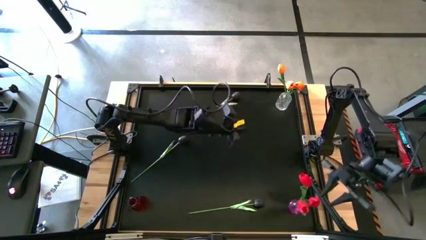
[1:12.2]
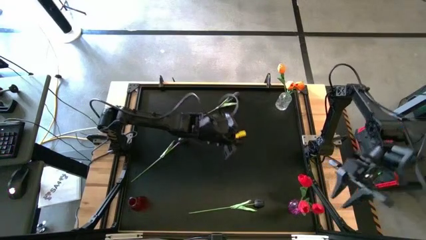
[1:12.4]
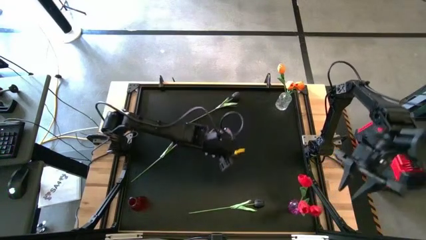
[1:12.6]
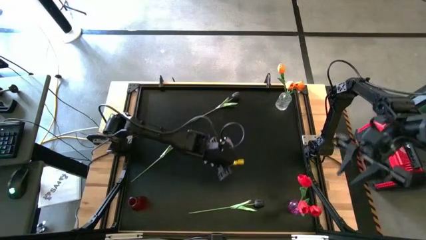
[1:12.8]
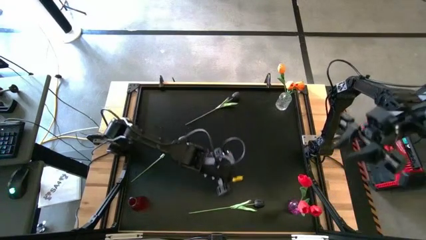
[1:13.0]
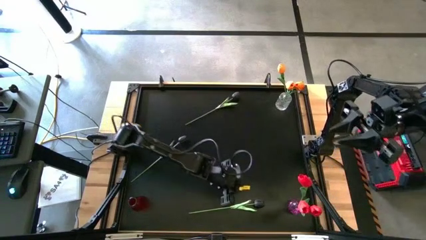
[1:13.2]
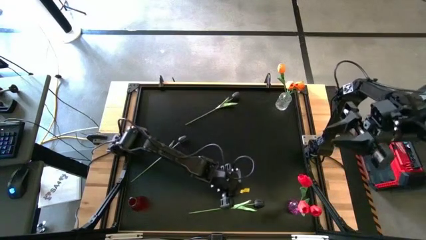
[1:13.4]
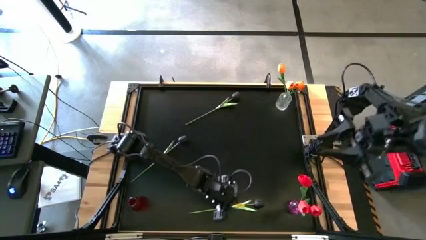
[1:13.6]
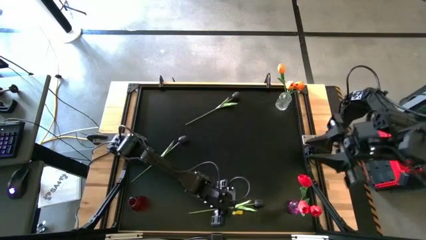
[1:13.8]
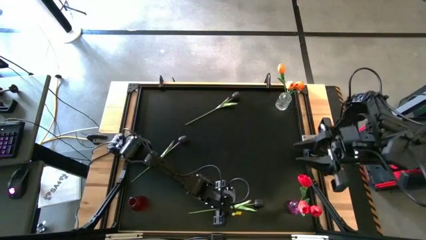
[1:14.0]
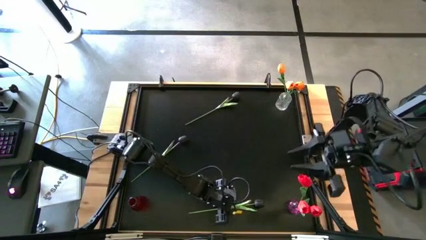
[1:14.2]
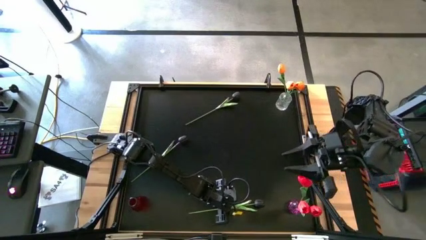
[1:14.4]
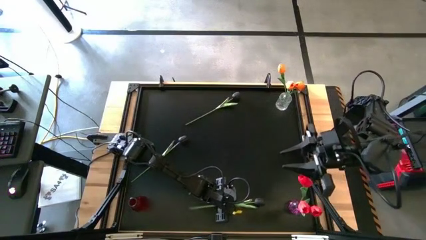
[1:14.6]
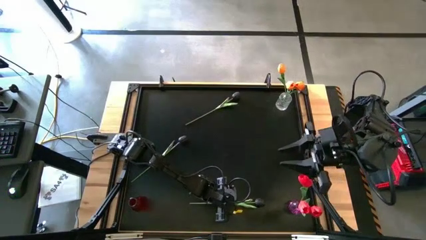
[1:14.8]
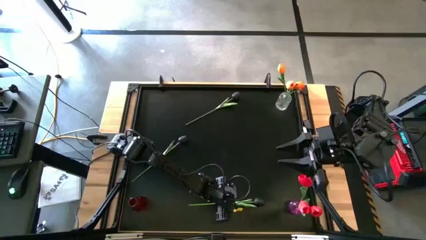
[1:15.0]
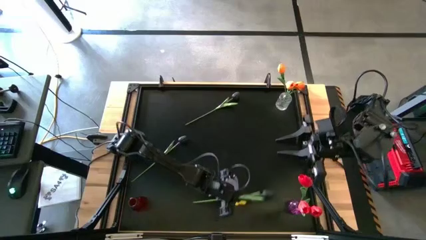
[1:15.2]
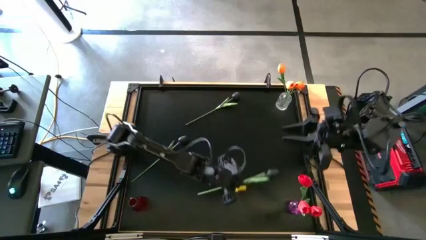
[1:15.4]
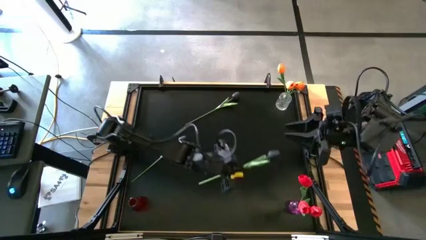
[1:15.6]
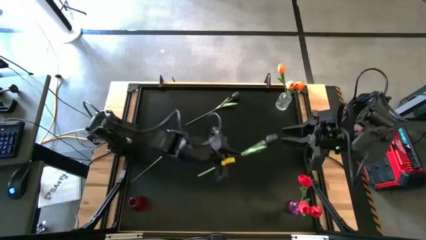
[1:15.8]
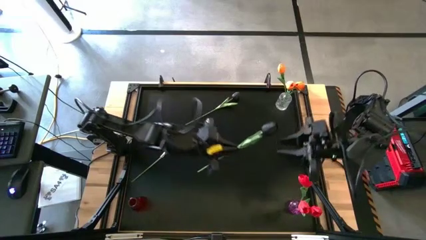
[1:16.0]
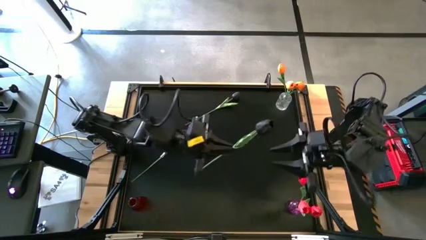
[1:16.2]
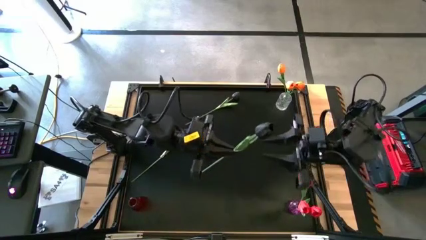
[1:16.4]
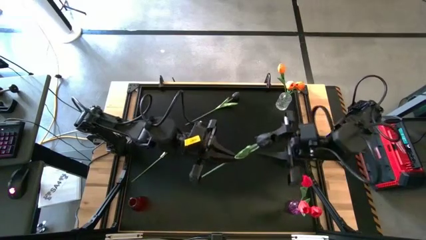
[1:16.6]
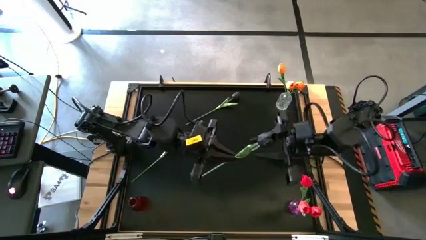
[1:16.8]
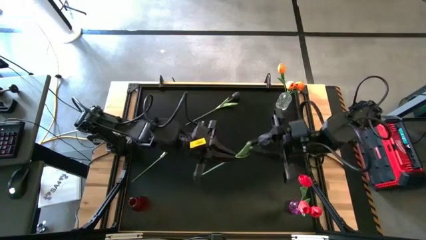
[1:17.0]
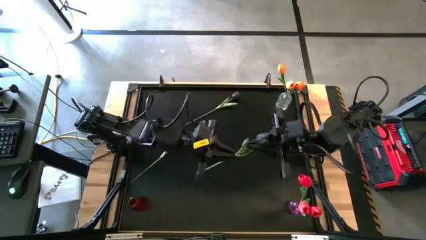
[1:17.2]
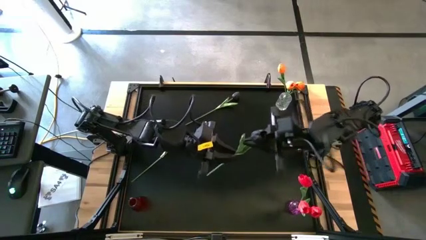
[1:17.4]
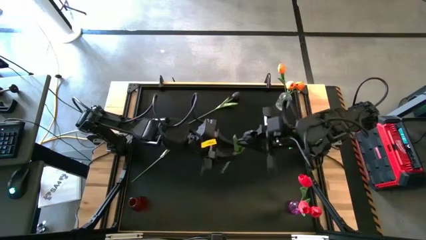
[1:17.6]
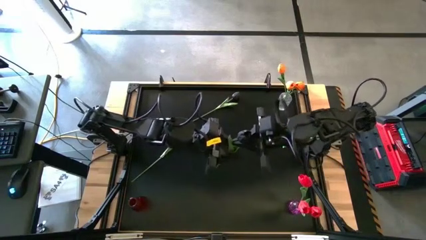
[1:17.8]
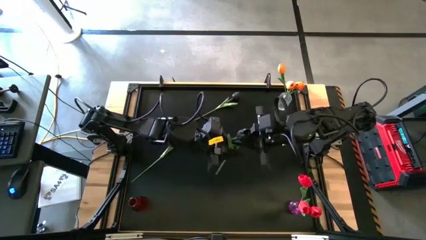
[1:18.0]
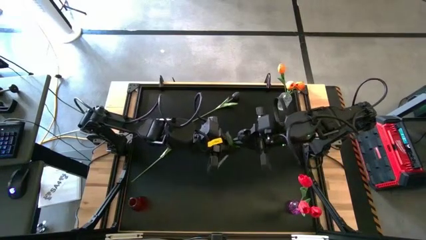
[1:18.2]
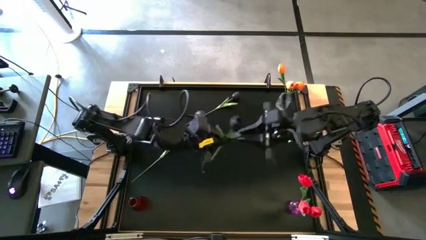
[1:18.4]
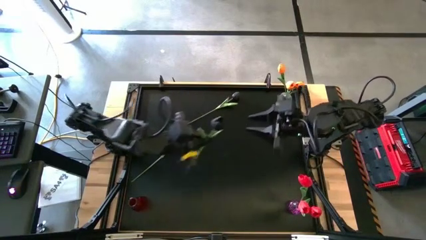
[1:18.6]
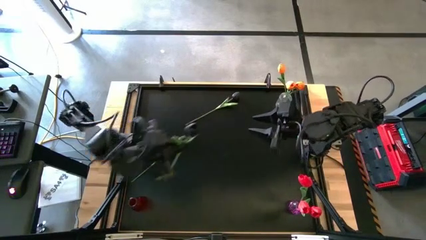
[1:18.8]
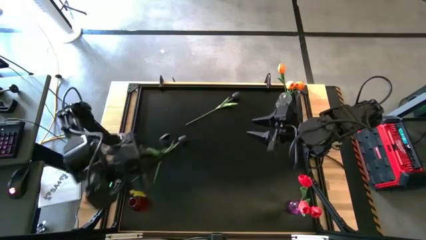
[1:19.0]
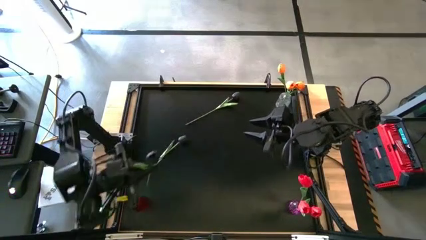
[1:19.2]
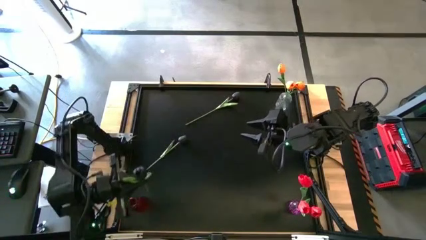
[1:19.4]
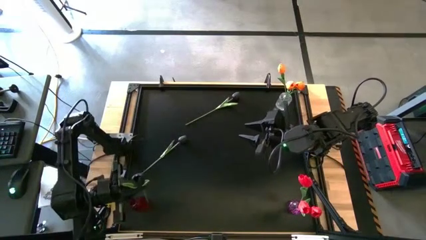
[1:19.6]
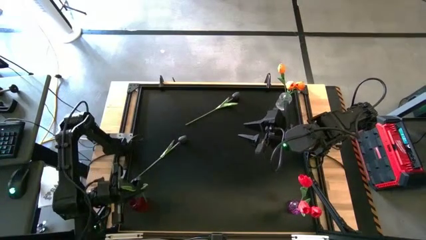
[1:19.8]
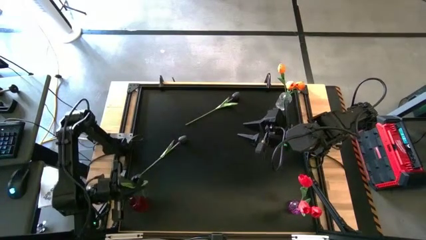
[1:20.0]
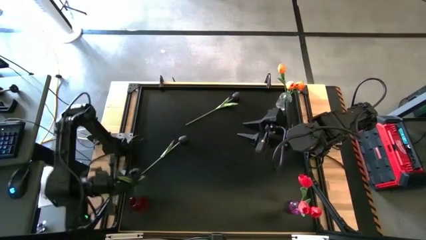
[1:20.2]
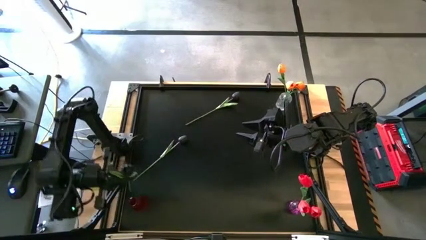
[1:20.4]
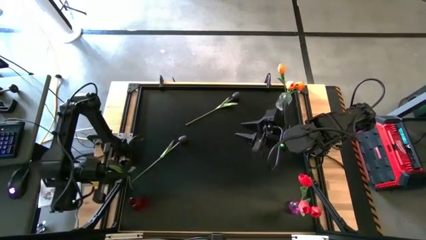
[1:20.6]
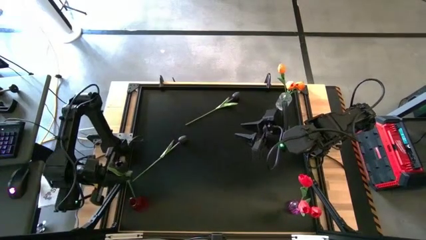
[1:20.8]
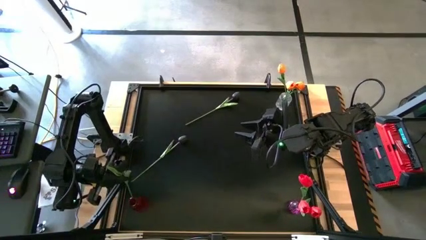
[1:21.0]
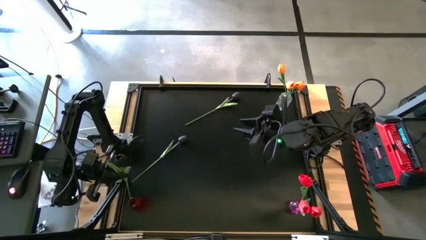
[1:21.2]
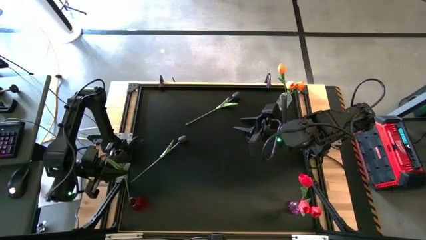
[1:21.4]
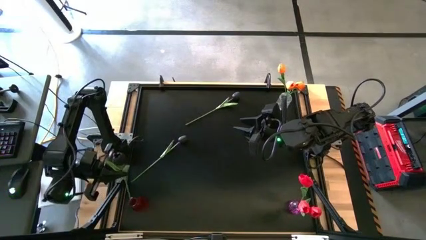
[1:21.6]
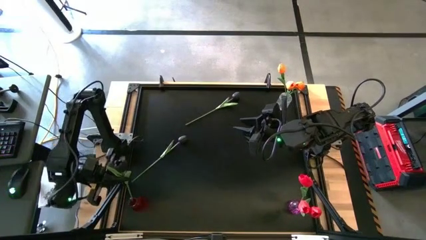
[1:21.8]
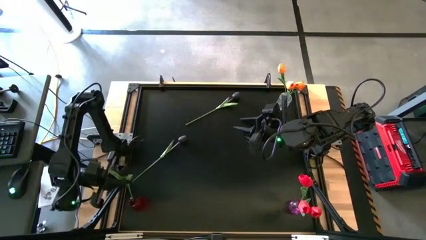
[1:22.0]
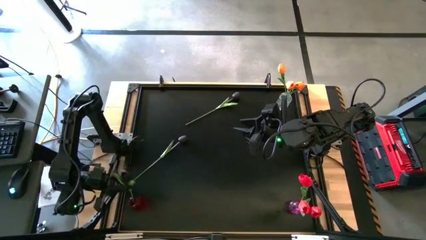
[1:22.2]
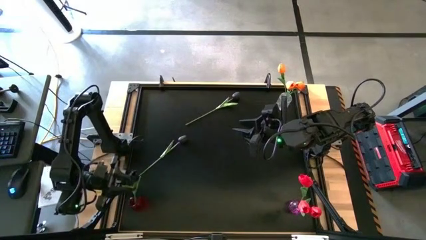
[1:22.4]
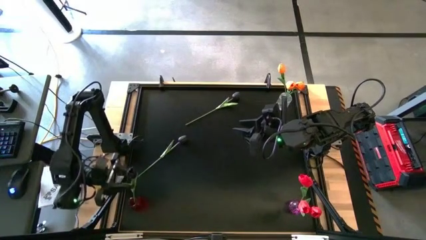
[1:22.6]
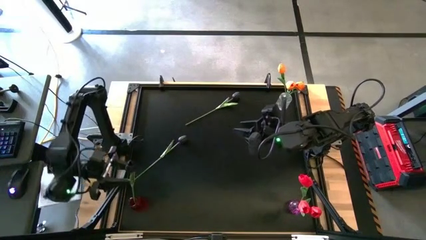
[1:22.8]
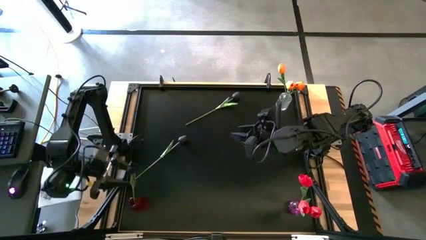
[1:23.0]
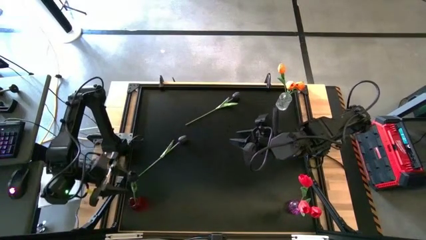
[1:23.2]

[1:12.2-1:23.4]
Task: Sort flowers into vase by color
Put the bottom black tulip into the red flower vase

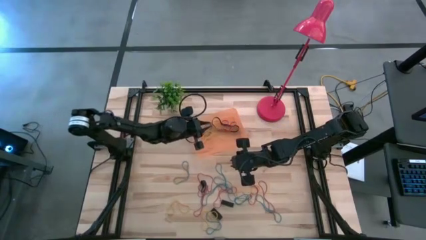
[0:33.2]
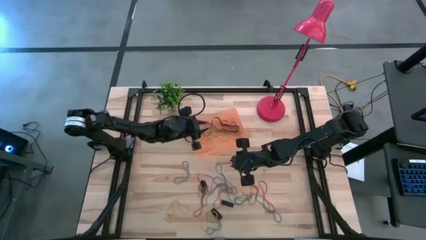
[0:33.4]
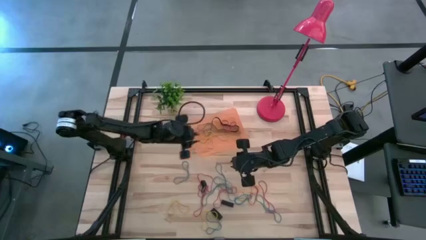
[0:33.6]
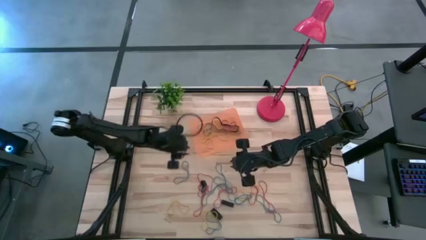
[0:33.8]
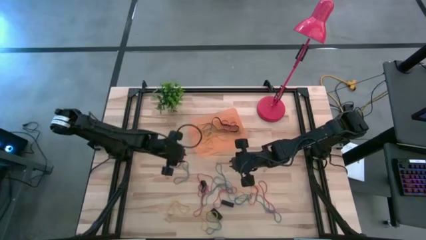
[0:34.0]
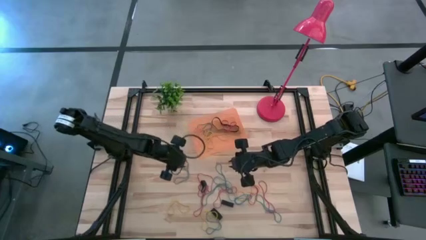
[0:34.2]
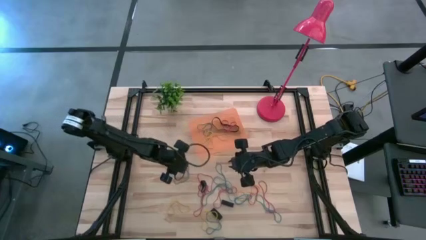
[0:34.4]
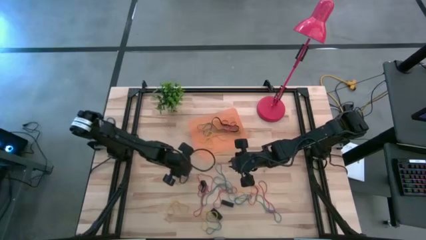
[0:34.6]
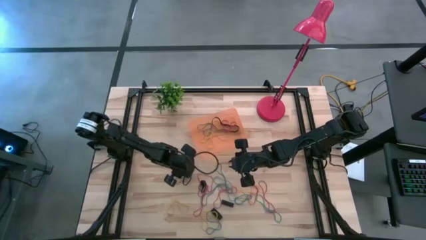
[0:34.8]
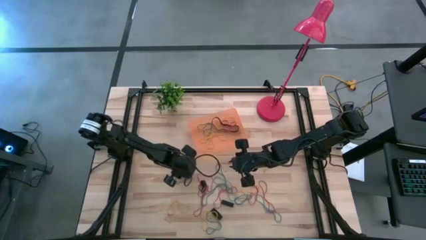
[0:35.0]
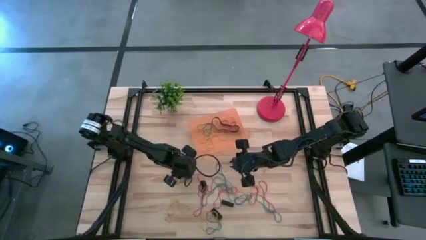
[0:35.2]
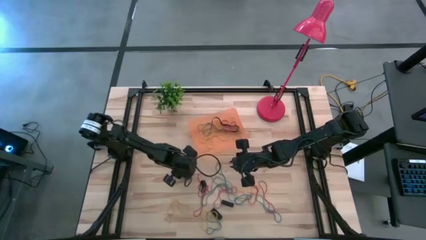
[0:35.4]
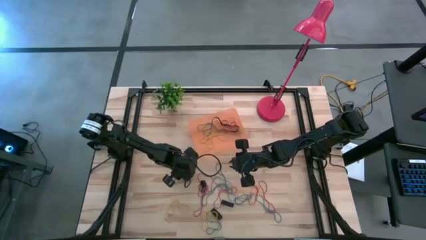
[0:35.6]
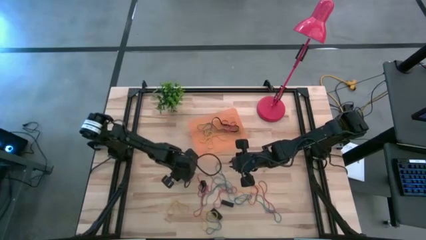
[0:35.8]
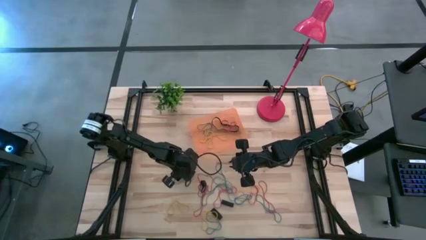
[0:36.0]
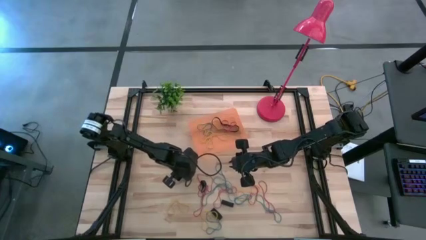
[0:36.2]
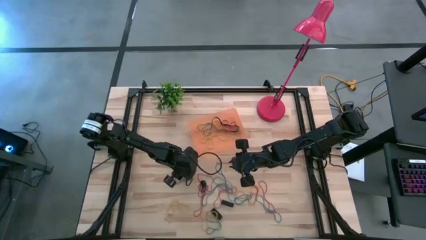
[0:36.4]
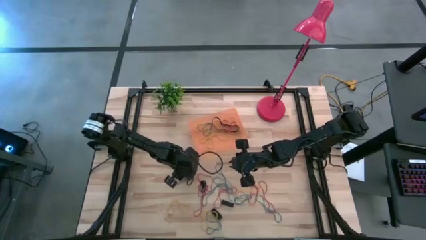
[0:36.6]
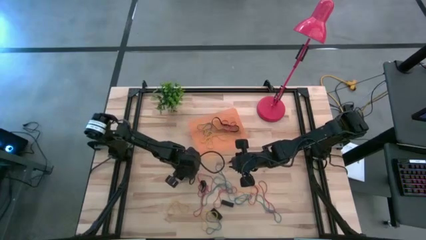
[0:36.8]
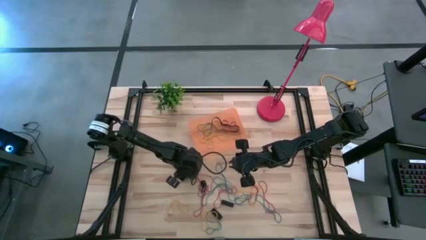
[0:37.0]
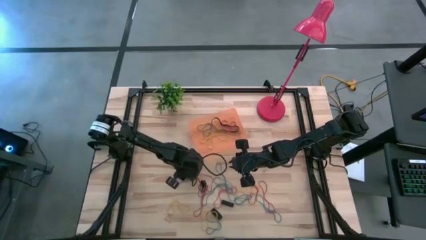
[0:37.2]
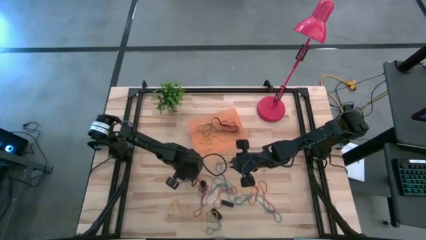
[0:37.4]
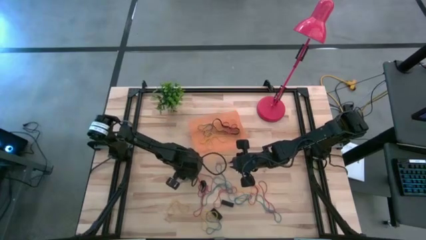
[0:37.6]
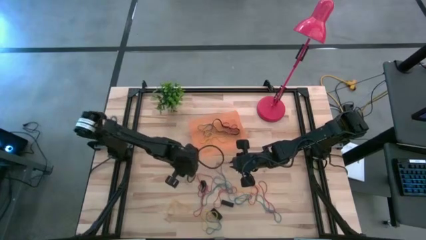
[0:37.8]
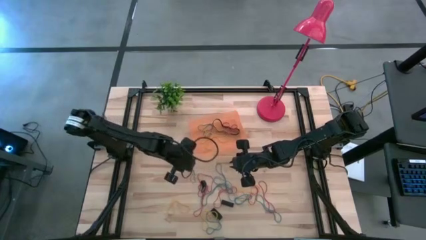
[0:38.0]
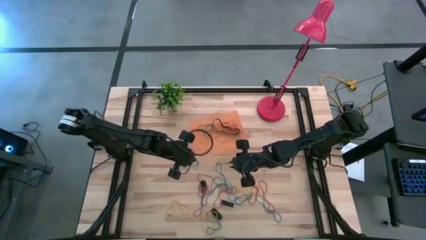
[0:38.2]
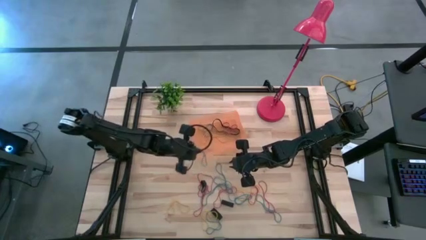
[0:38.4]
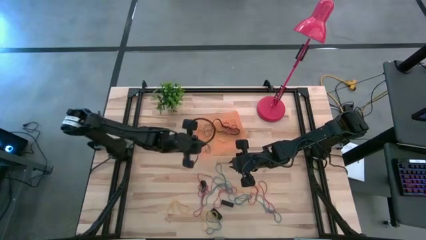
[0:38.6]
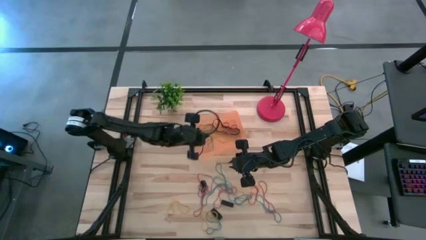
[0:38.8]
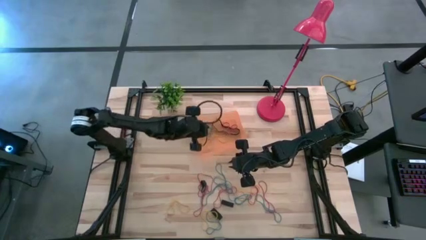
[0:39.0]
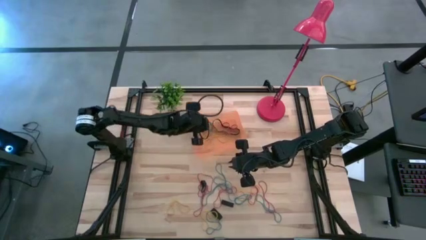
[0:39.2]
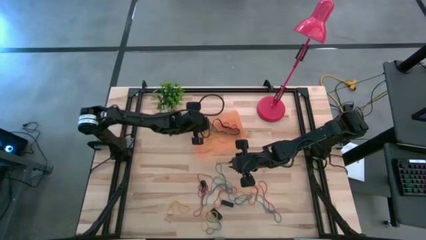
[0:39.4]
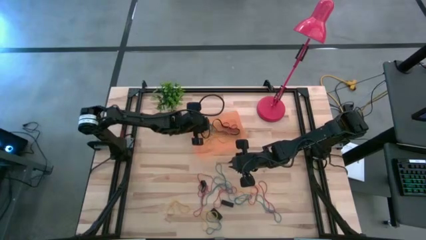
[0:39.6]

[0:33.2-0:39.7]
Task: Pick and place rubber bands into bin
Put the blue rubber band into the orange bin
